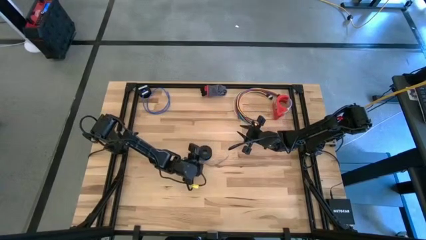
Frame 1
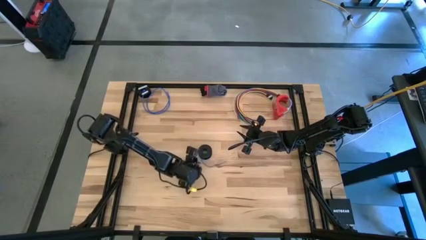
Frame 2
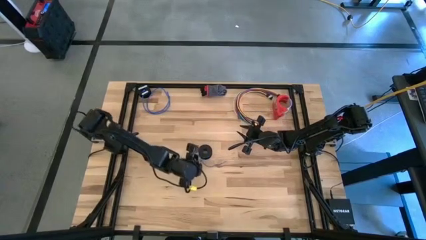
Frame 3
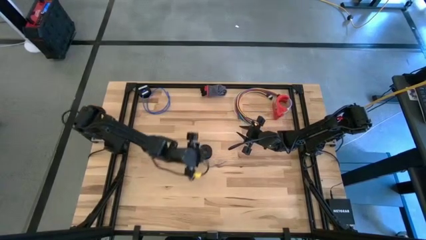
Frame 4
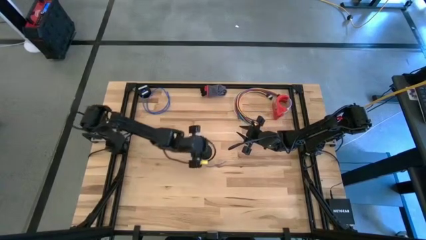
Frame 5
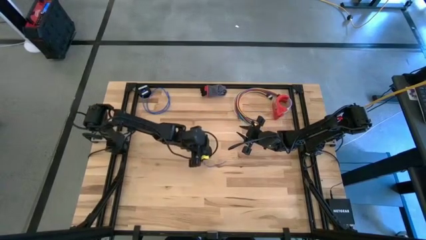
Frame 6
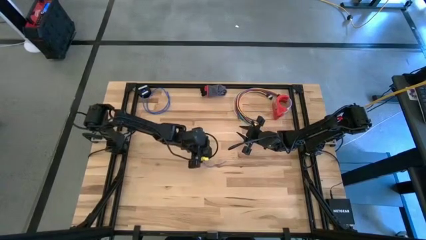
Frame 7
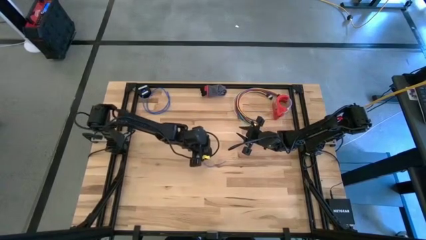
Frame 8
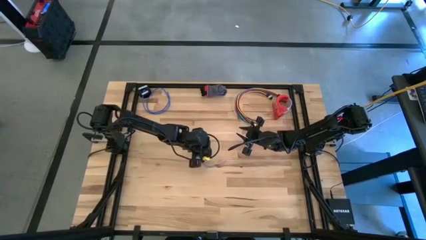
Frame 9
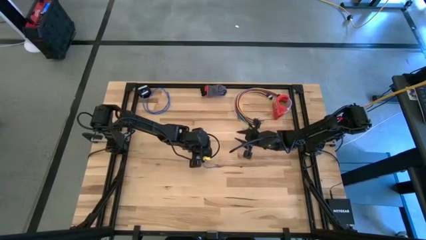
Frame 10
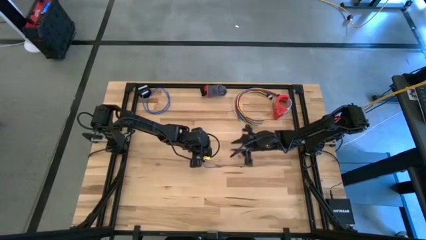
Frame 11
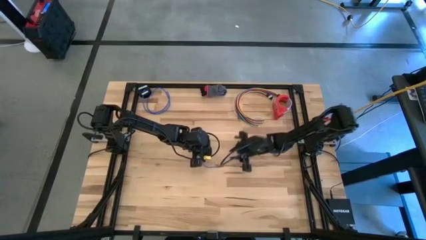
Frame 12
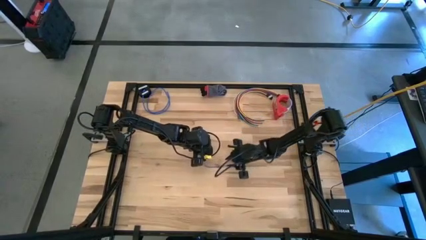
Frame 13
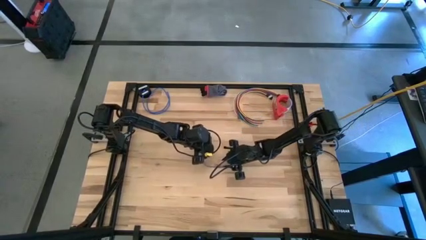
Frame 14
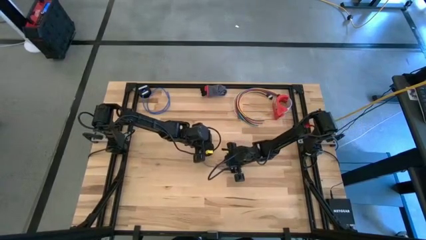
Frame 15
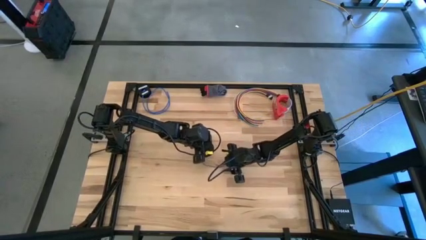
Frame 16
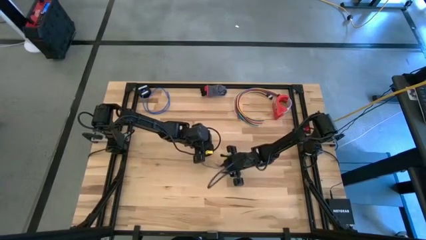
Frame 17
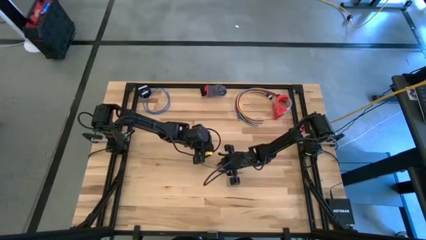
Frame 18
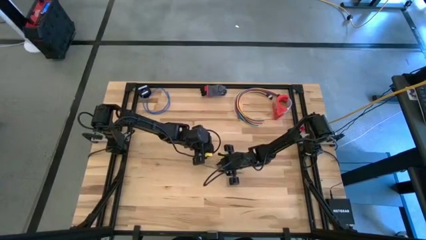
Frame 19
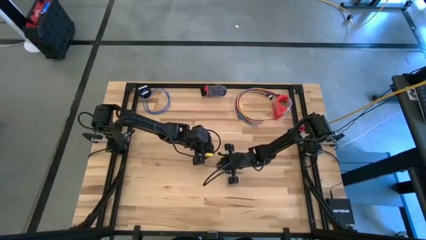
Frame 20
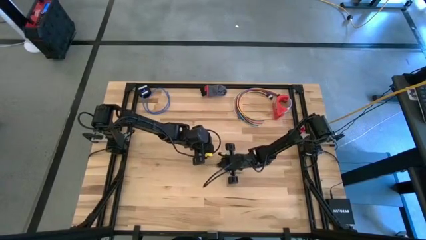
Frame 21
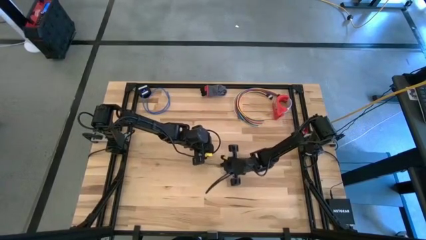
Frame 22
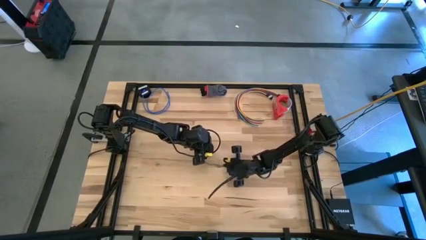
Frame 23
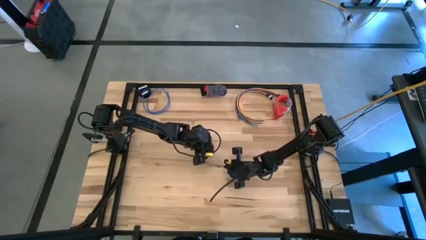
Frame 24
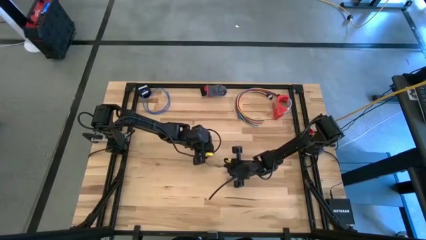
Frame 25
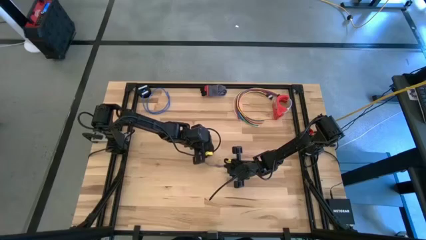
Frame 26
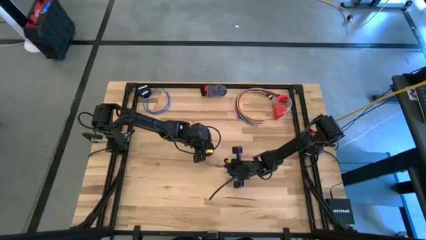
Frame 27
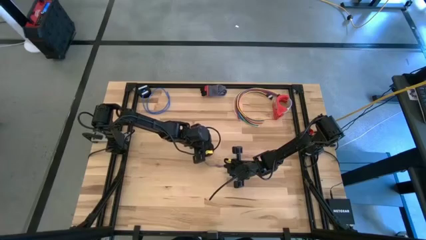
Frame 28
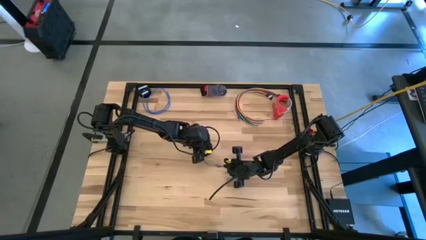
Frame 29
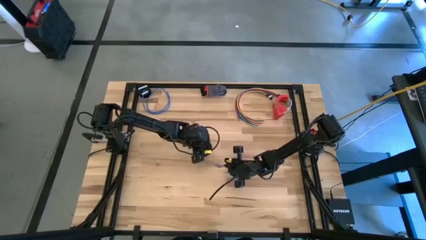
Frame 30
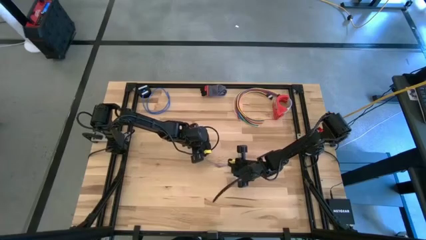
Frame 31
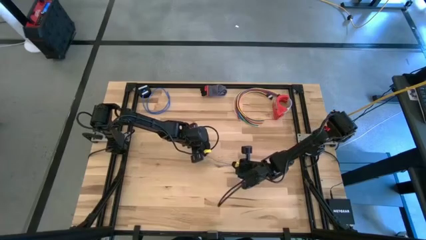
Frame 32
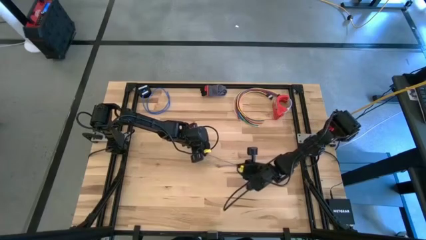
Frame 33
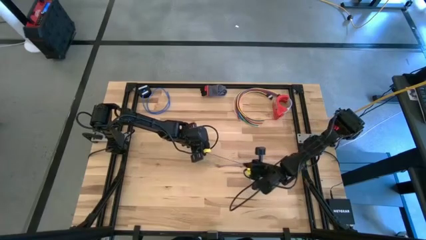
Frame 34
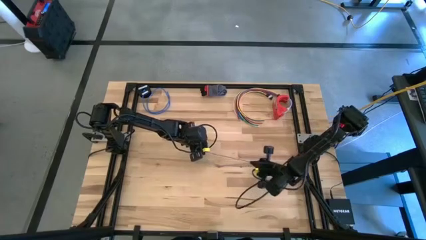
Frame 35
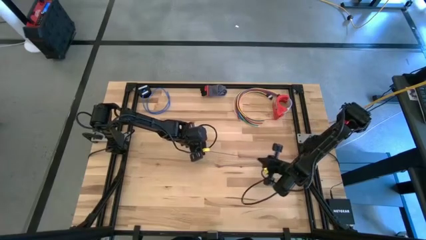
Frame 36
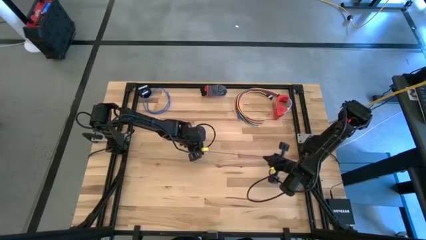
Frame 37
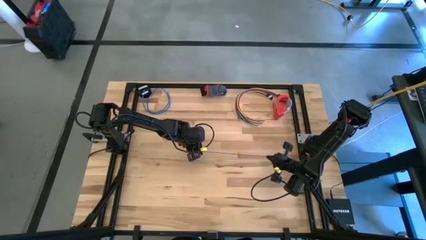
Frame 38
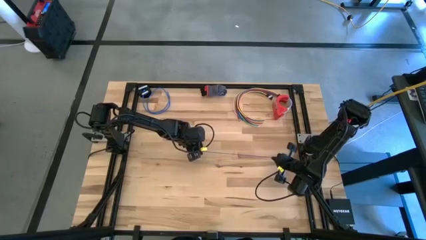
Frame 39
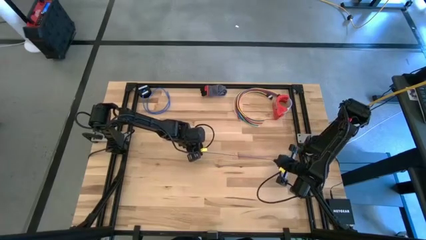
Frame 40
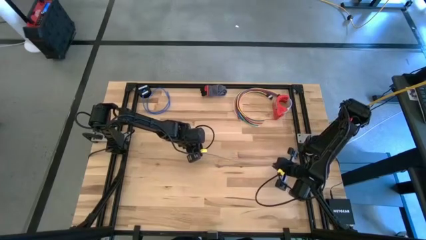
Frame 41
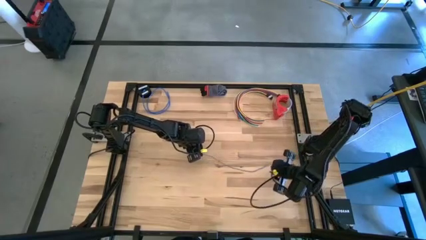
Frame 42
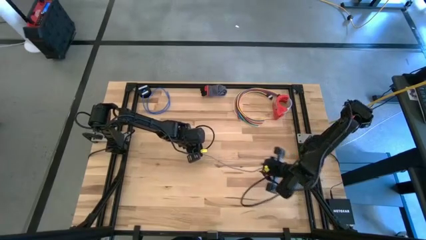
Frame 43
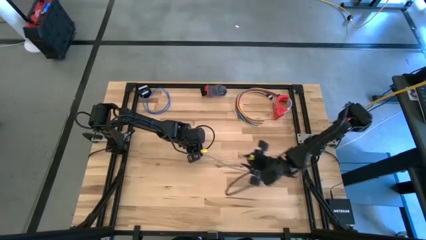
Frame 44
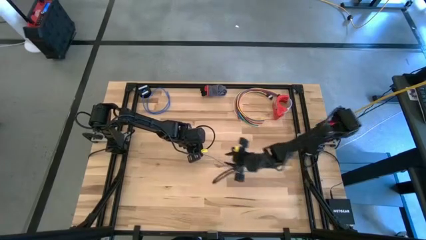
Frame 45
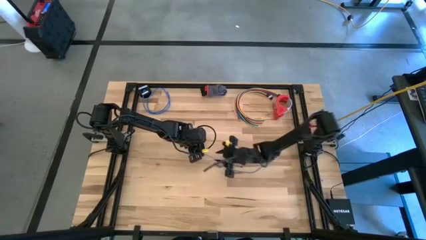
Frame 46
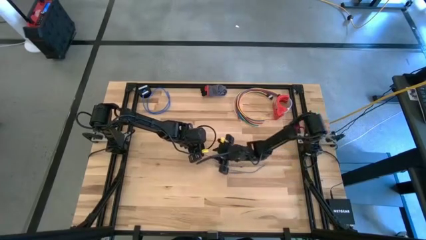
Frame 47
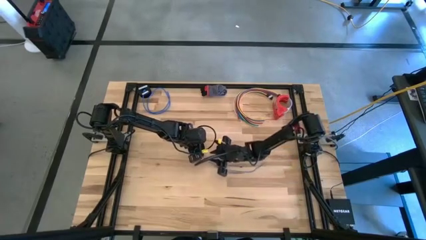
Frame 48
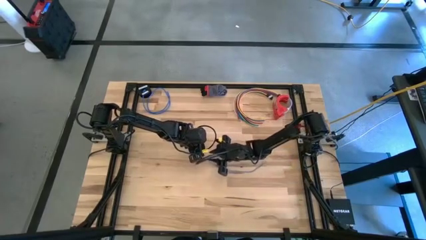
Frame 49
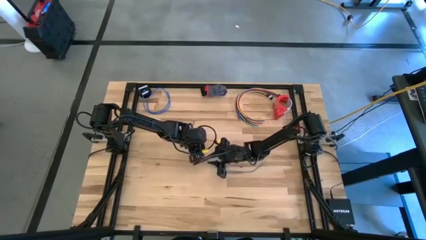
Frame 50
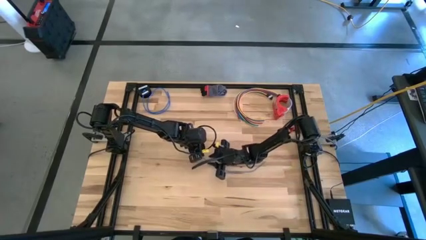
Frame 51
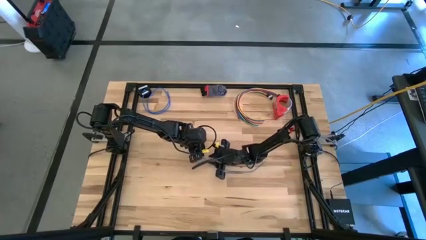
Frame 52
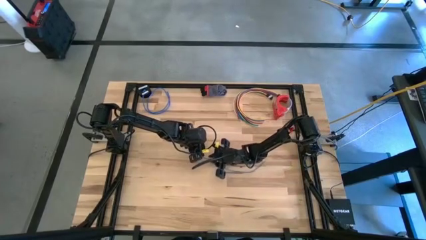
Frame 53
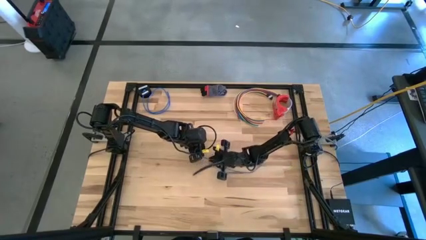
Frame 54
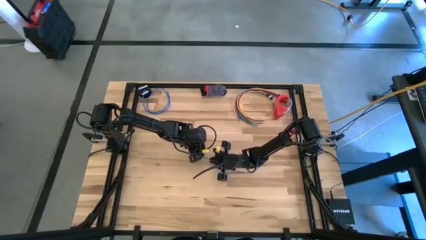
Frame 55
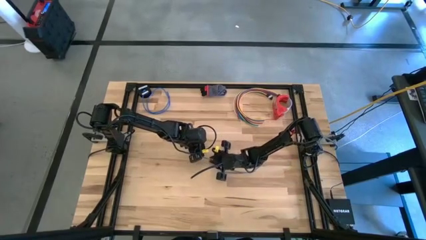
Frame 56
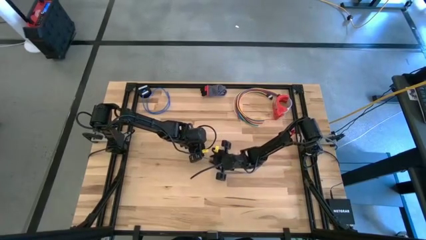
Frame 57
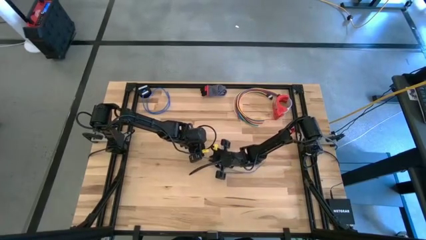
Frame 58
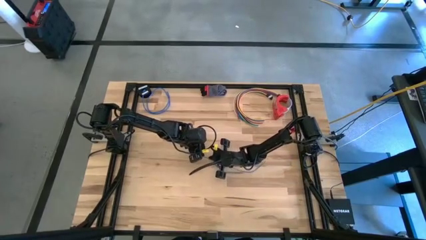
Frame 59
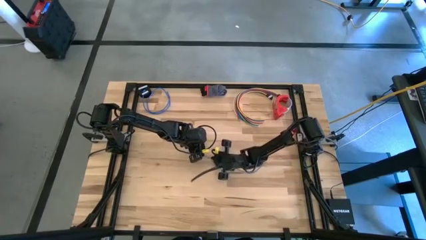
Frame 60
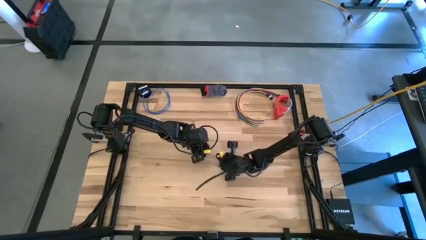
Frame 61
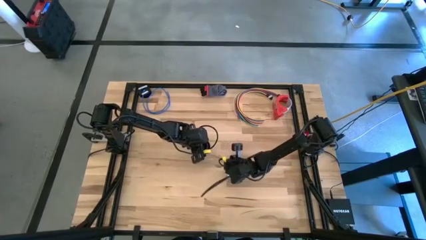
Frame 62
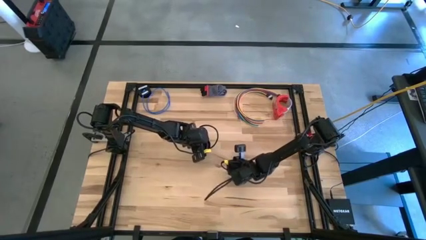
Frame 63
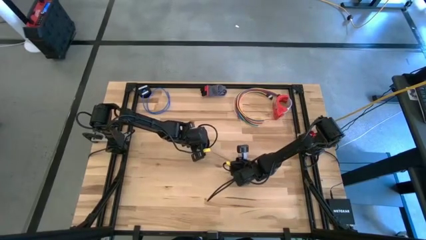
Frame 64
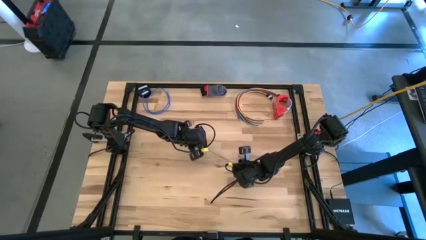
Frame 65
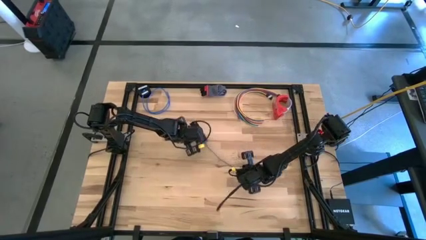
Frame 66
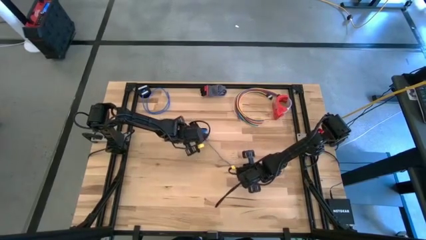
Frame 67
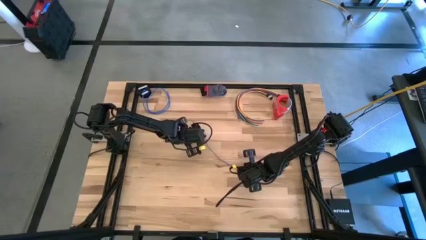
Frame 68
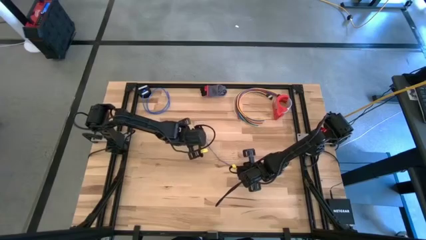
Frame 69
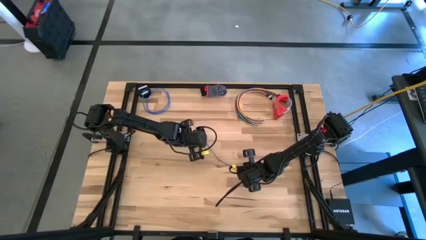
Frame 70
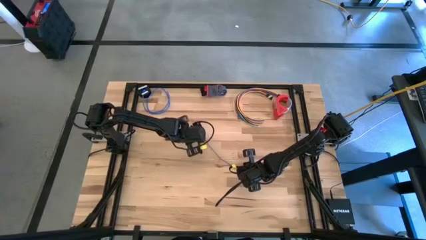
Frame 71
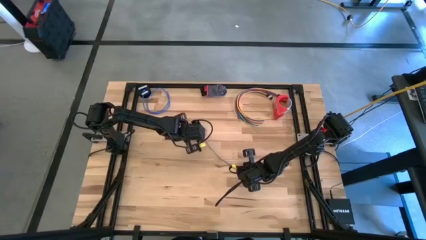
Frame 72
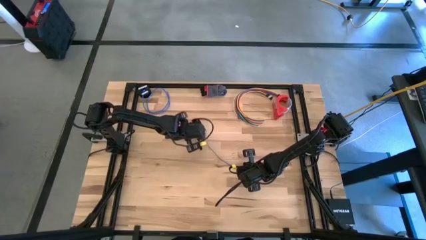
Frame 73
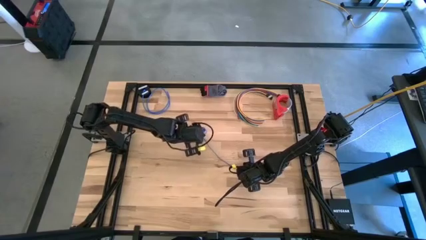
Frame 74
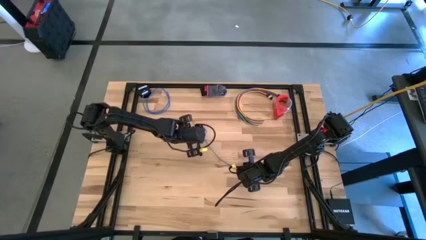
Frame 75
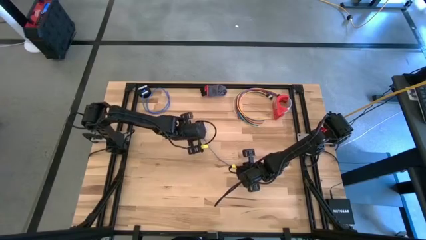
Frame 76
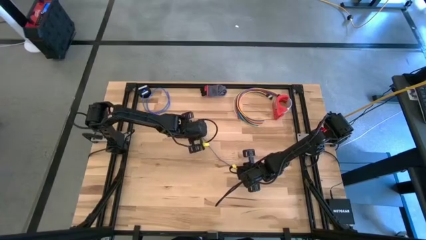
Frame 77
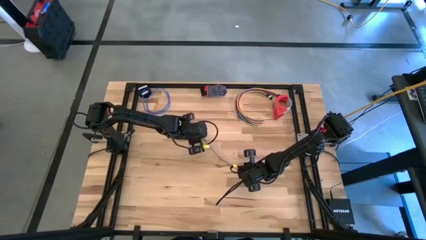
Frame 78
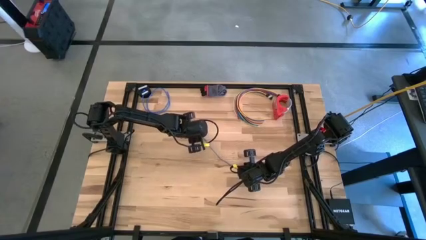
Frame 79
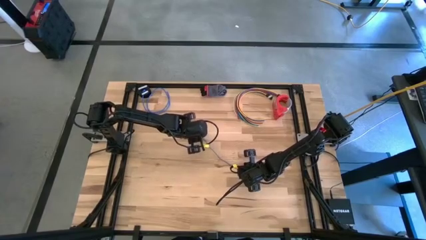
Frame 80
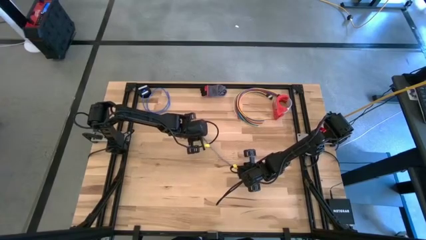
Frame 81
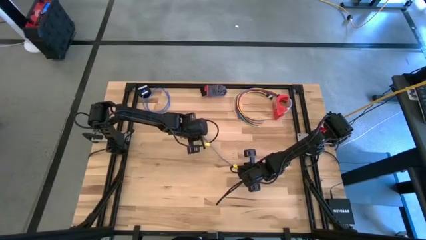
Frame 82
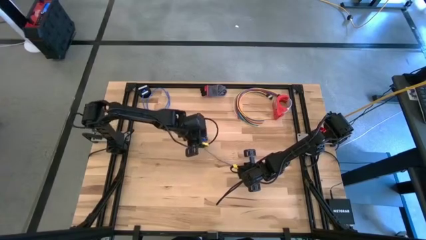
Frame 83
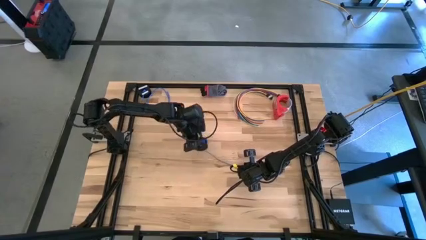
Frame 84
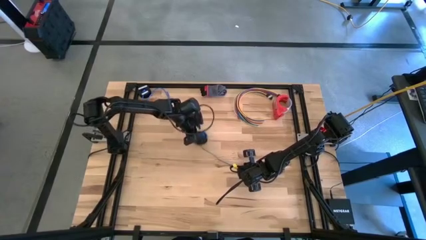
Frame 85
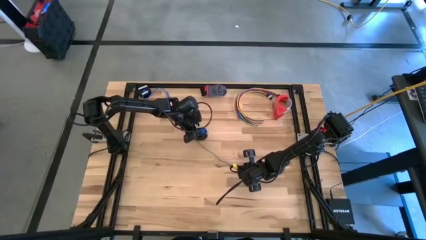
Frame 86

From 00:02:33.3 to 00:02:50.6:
Task: Coil cords
Uncoil the blue wire from the black spool
